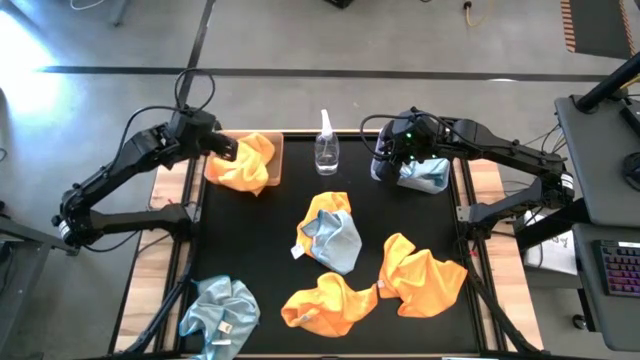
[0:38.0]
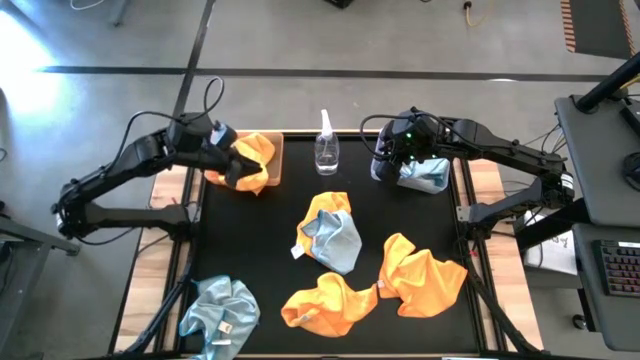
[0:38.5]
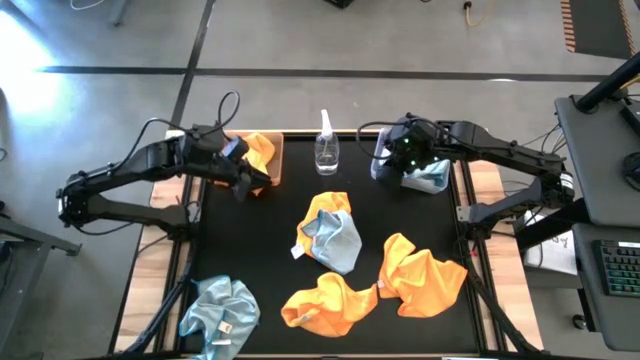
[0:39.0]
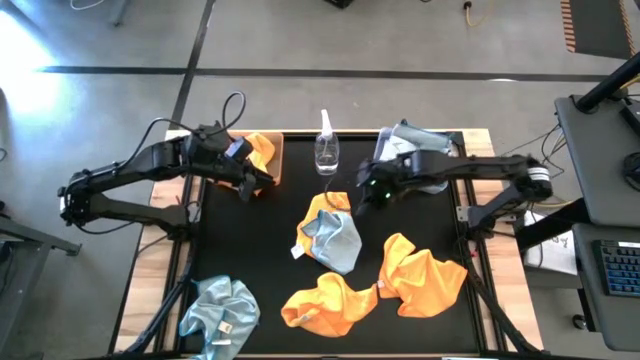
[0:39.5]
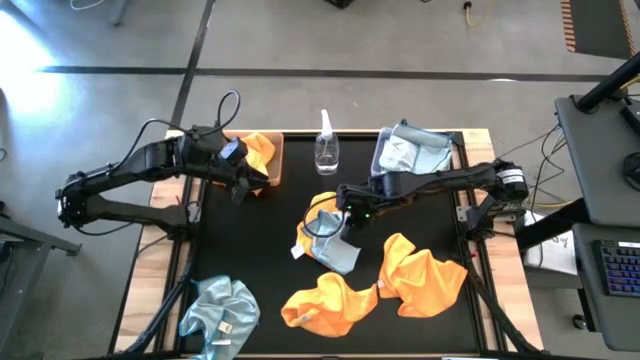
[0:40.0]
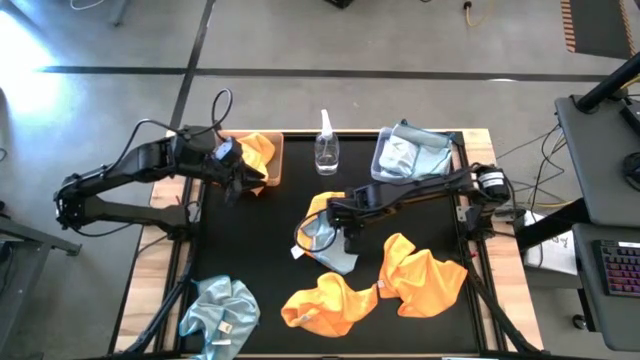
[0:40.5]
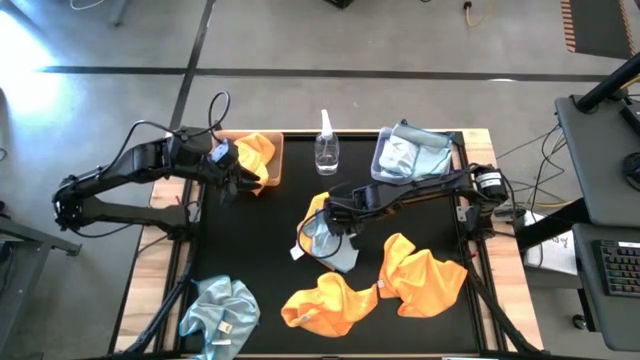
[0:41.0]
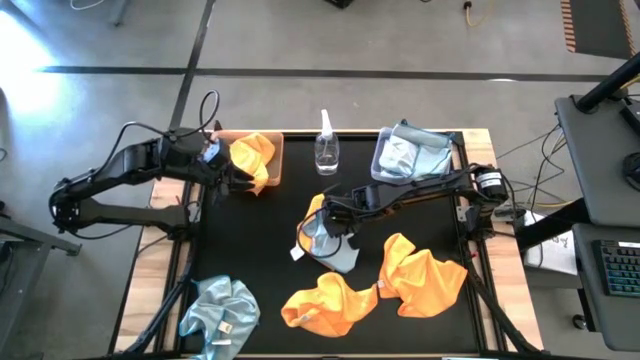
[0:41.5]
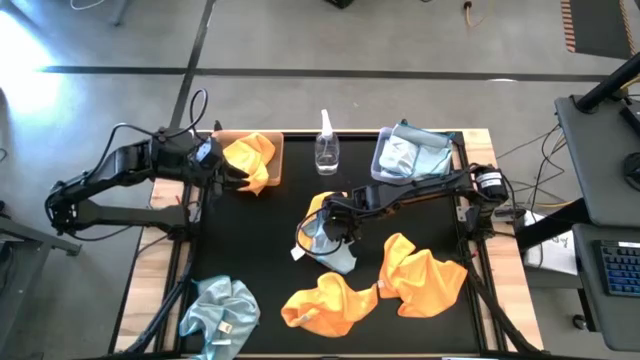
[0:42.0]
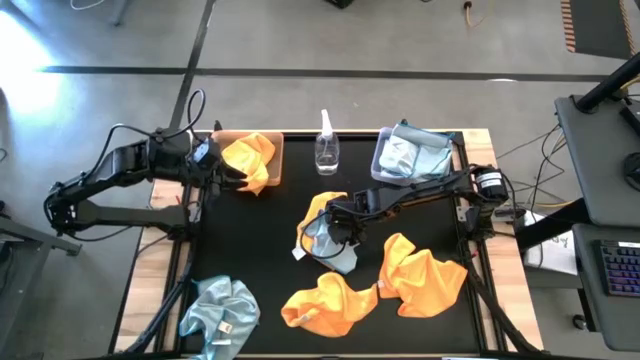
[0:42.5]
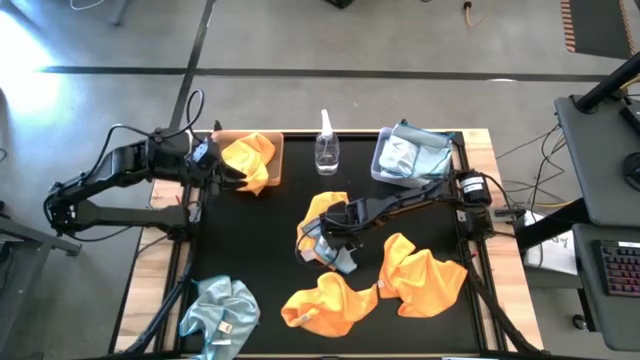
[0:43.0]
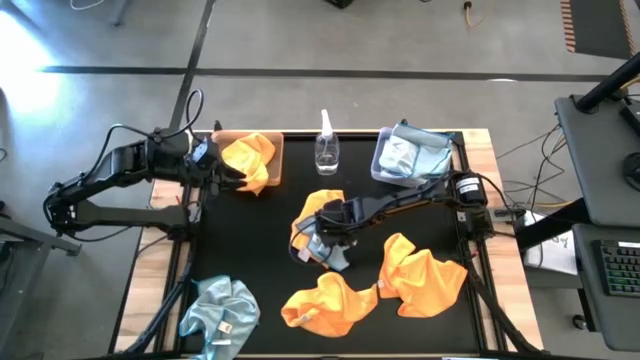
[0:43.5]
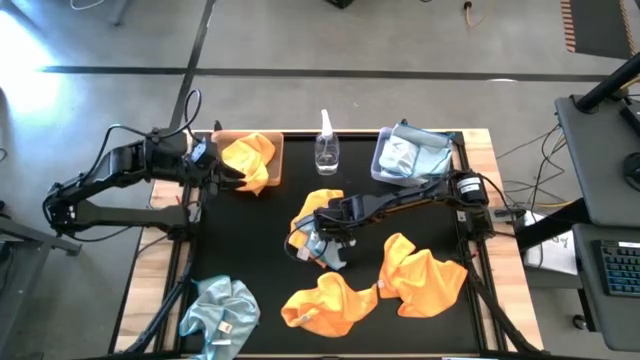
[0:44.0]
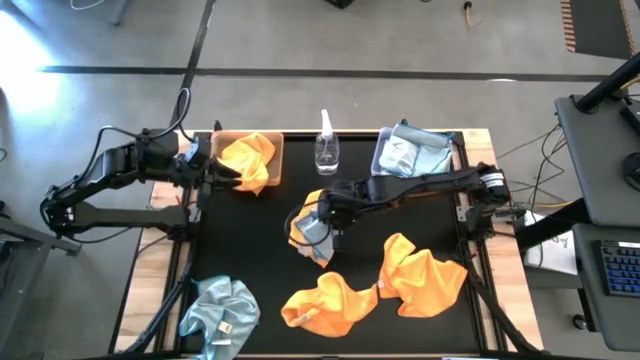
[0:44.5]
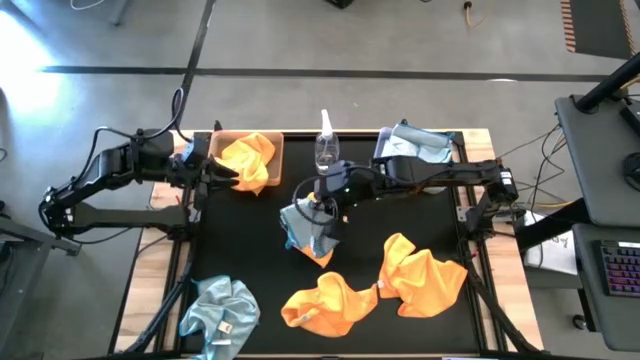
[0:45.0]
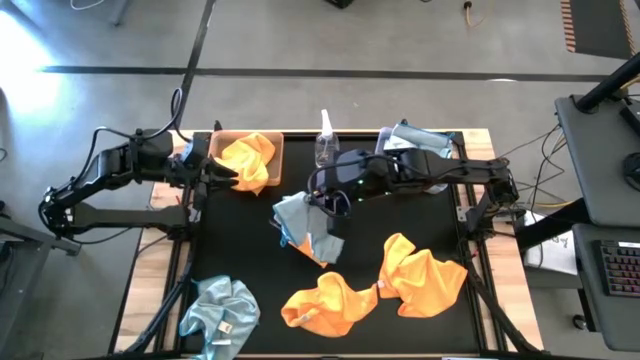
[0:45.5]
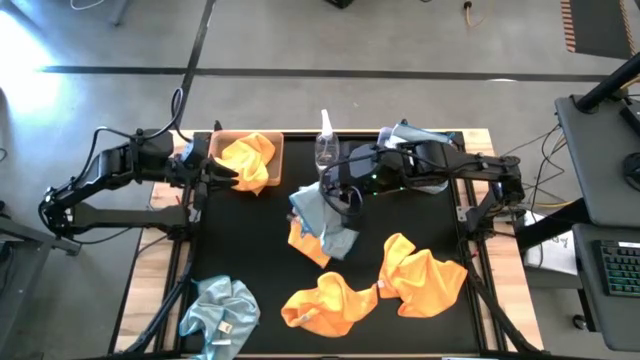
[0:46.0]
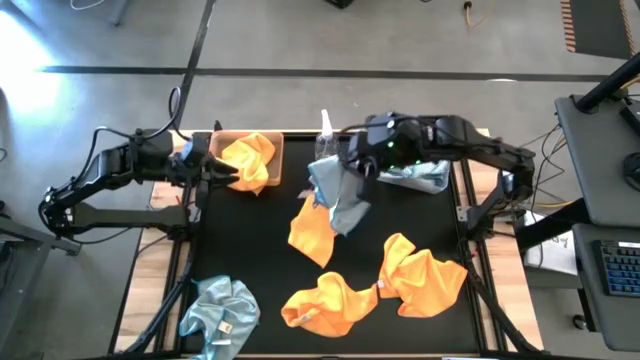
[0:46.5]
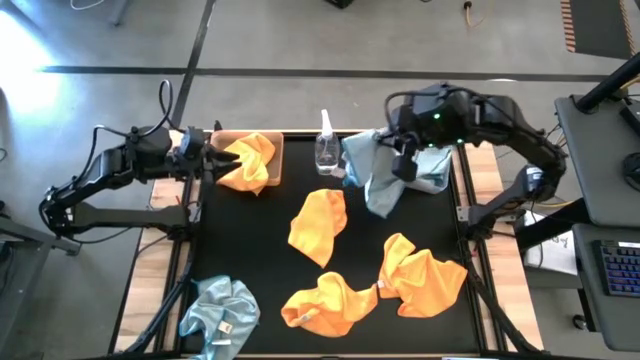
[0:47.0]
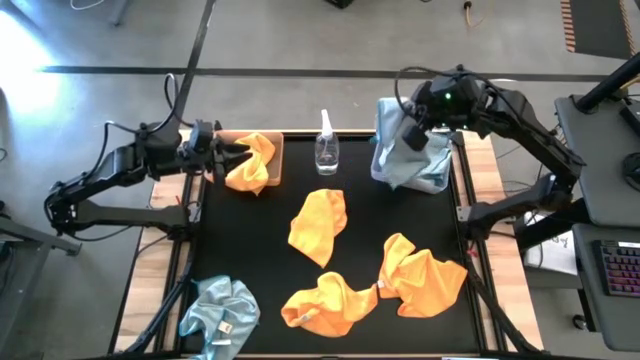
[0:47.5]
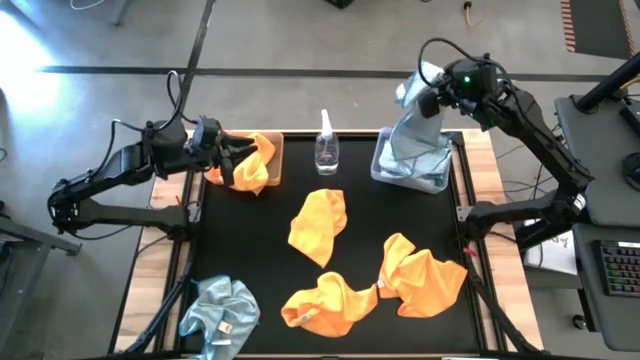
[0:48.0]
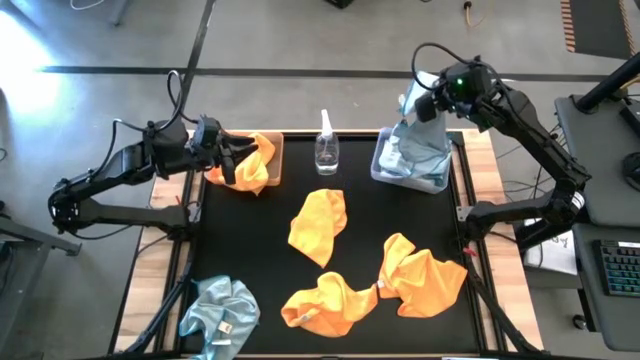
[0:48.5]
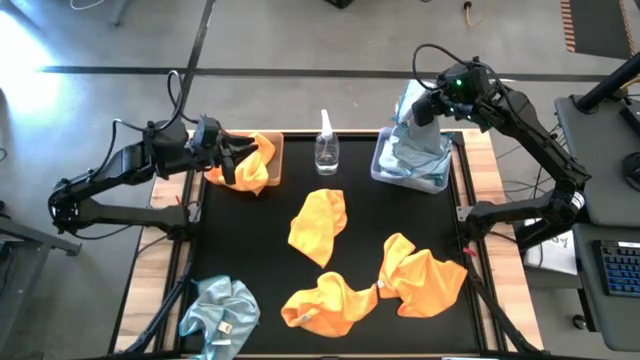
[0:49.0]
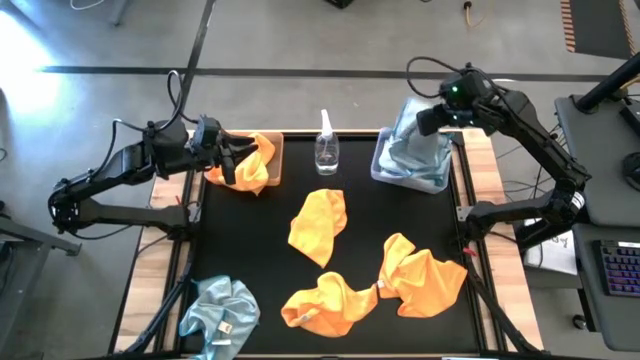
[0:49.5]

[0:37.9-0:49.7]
Task: Sort microfiber towel by color & place in baskets
Put the blue towel into the transparent bin

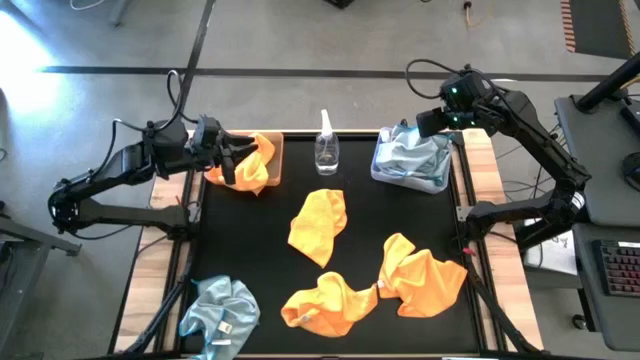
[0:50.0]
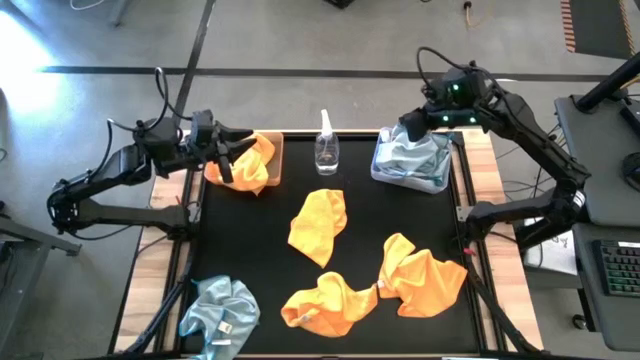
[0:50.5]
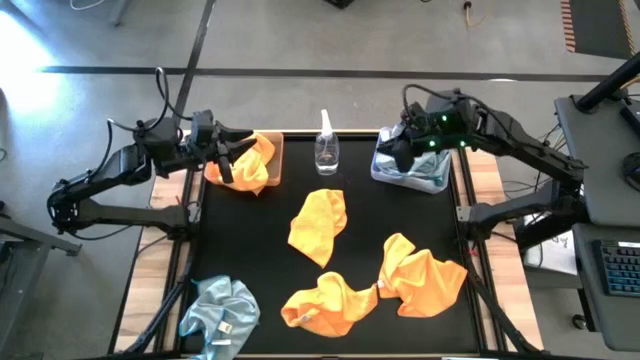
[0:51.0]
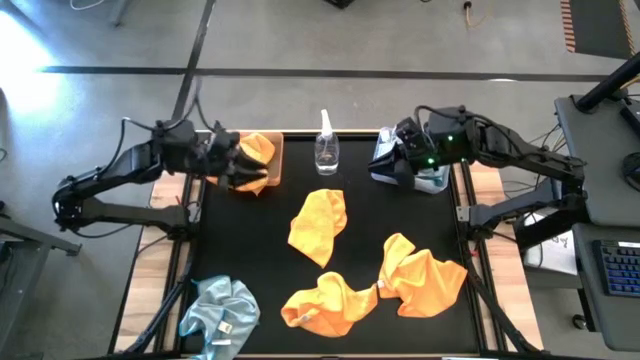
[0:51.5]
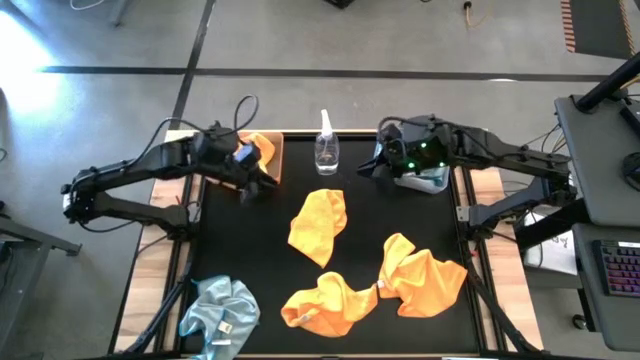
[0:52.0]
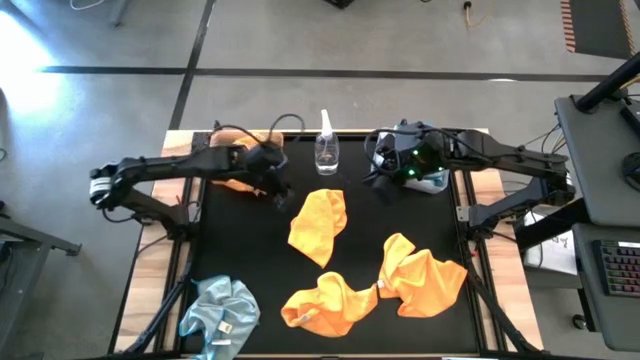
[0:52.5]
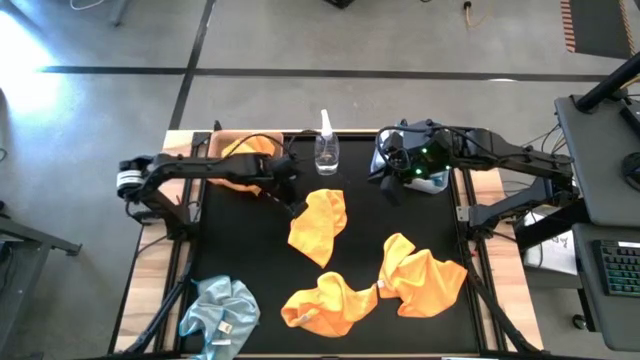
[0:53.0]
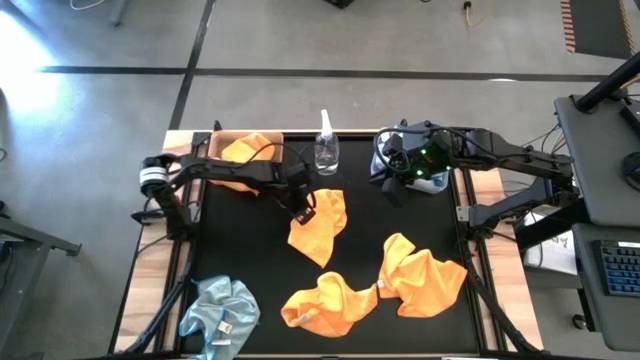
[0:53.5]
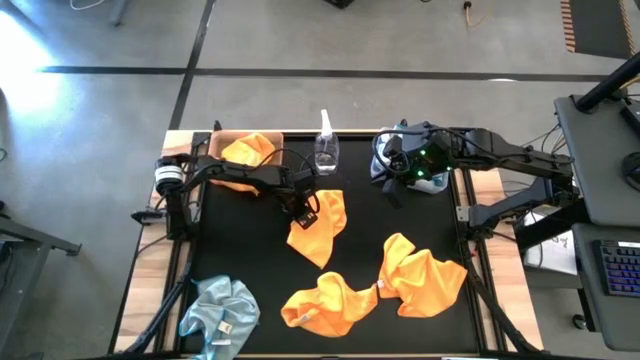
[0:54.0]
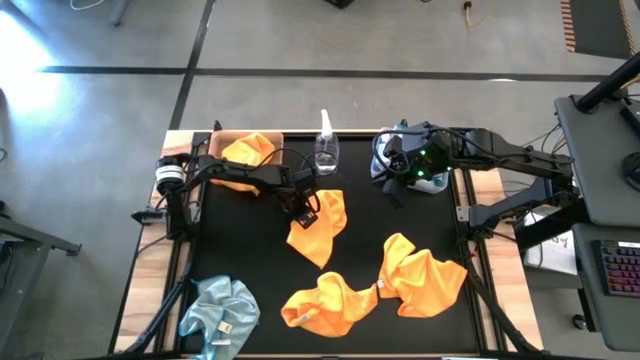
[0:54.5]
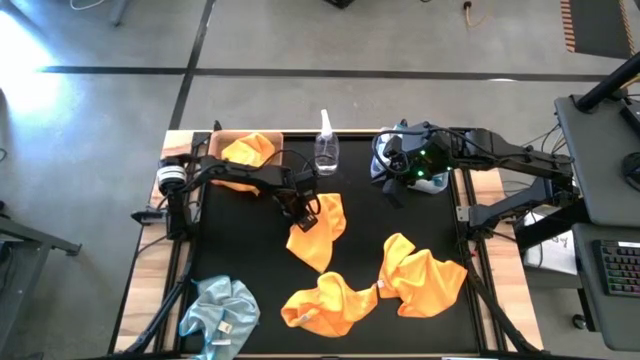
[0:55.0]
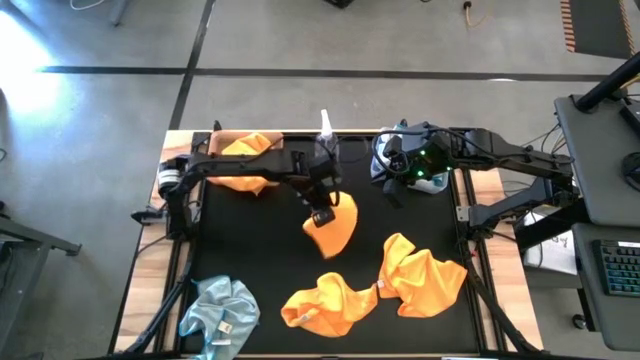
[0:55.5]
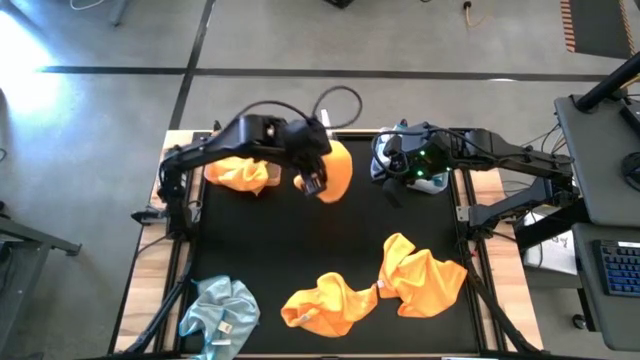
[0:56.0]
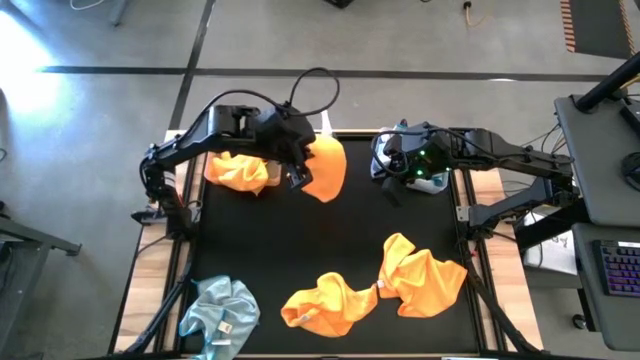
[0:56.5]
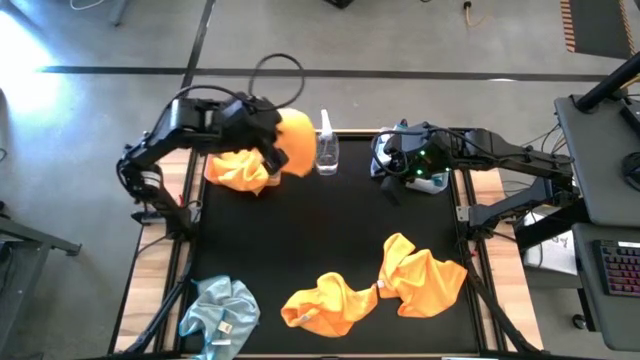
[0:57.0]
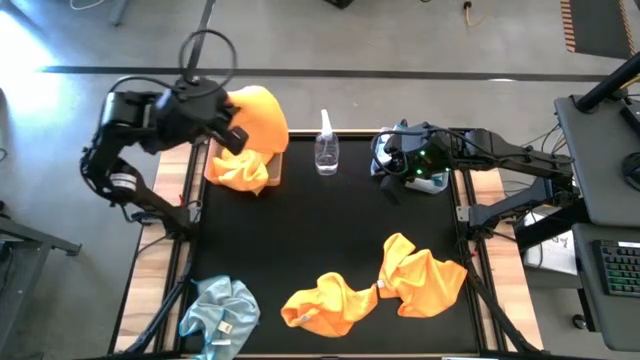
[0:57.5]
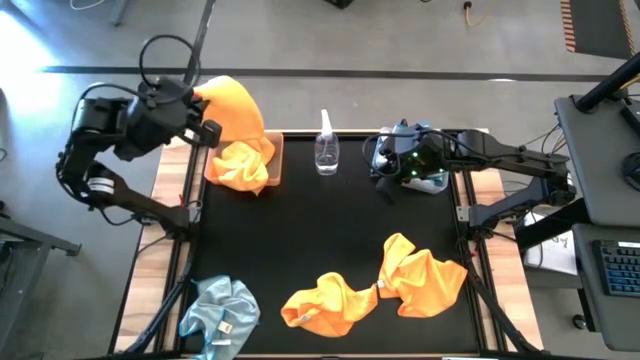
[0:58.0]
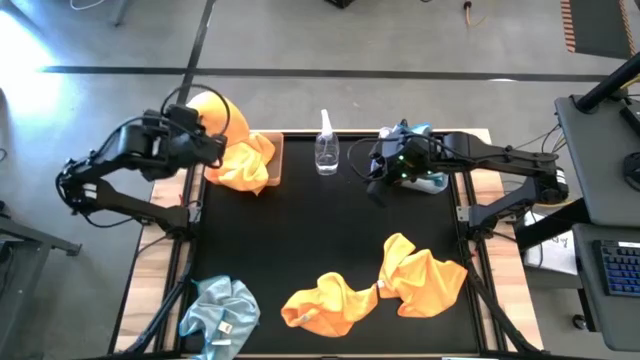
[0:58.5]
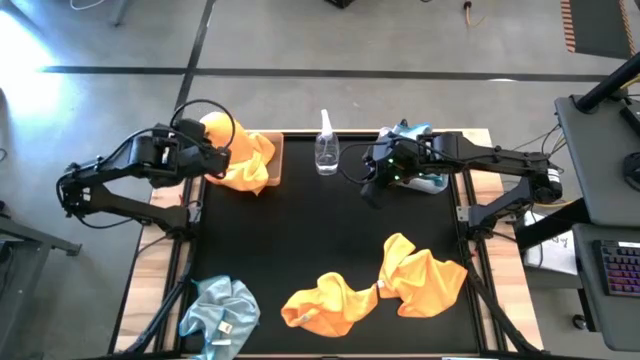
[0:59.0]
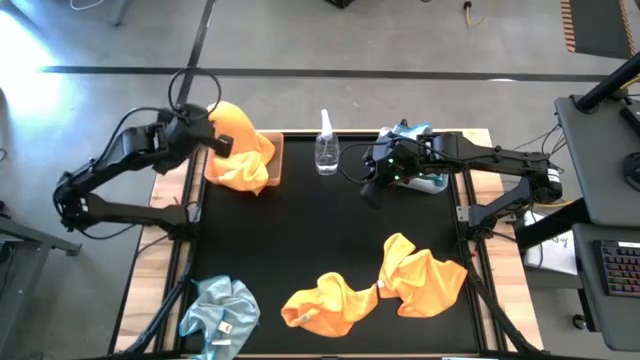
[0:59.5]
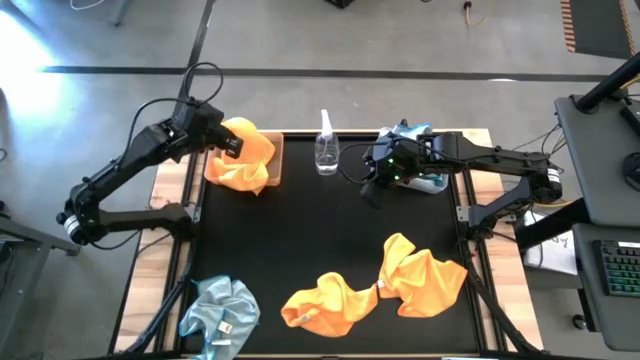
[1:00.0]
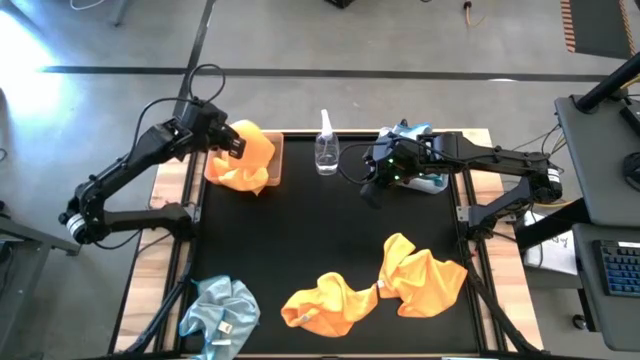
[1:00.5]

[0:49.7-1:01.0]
Put the yellow towel into the orange bin
